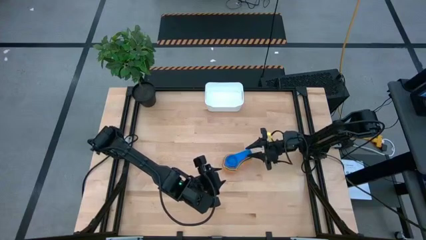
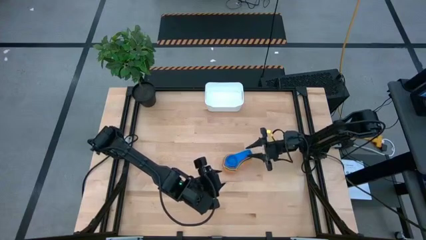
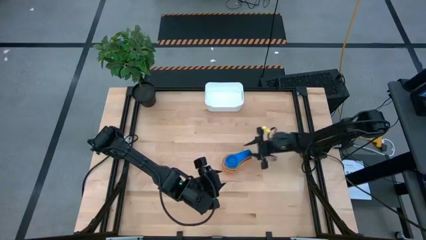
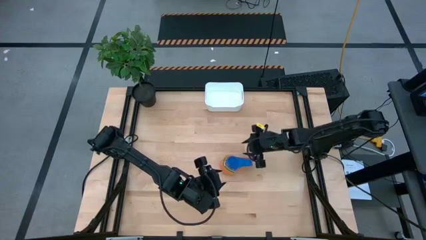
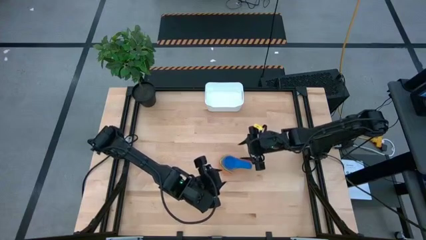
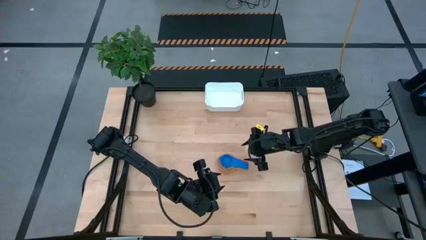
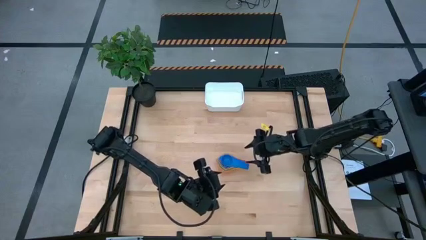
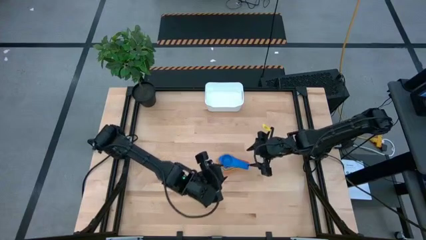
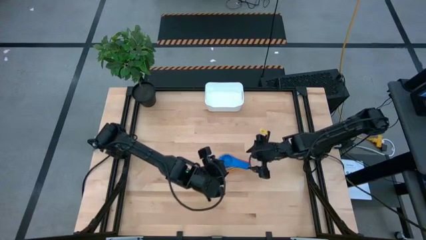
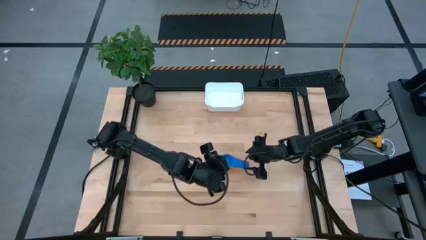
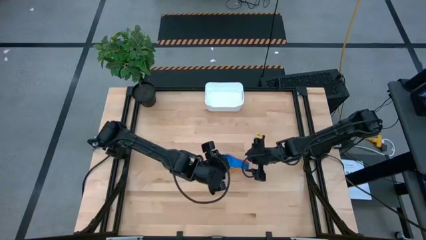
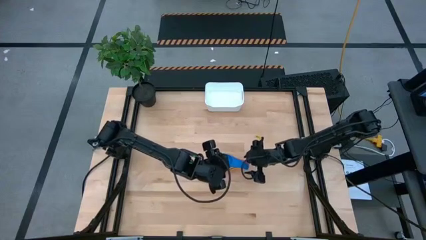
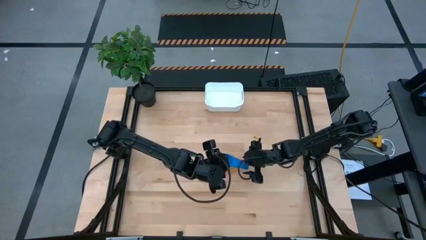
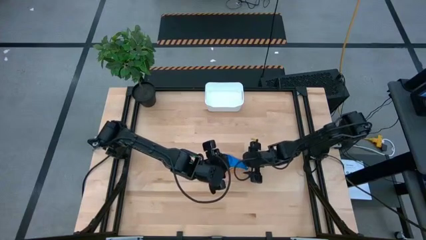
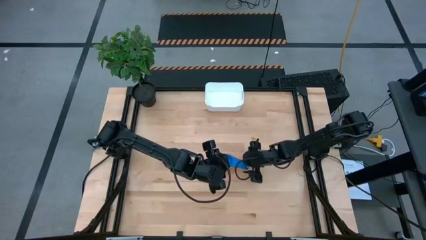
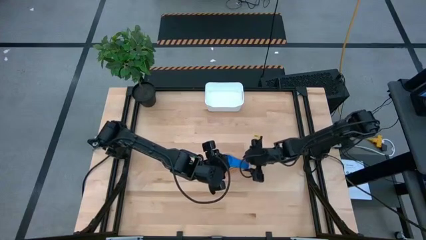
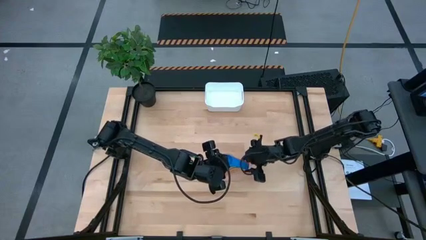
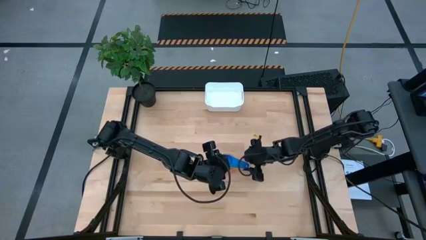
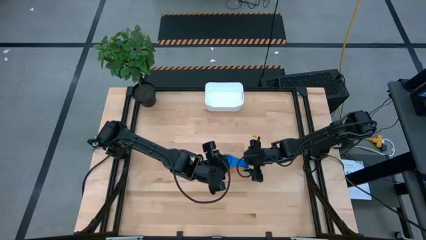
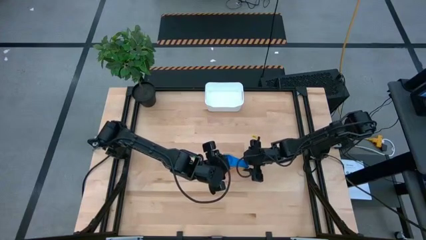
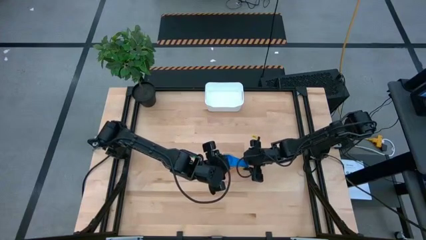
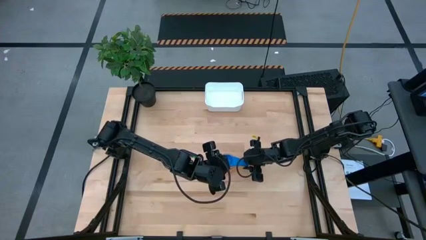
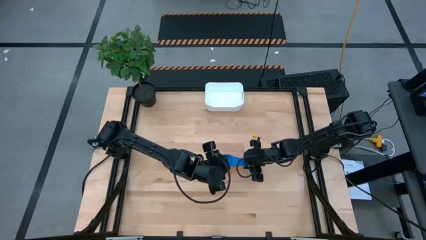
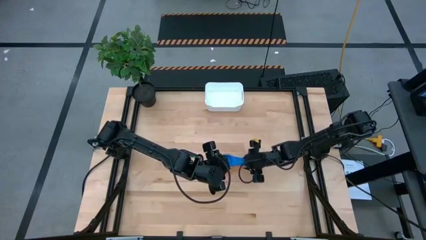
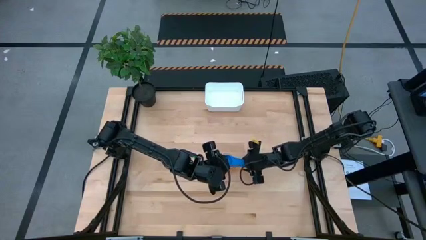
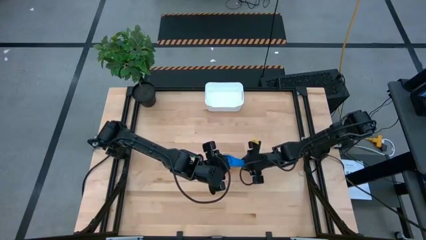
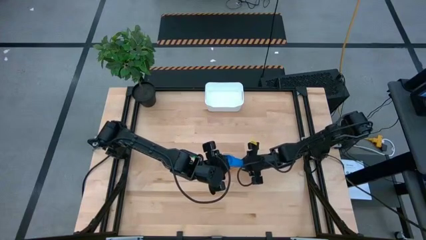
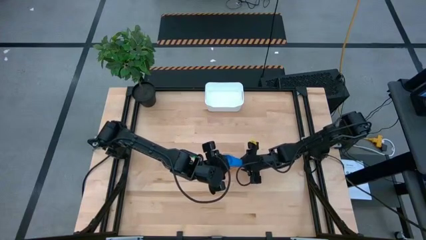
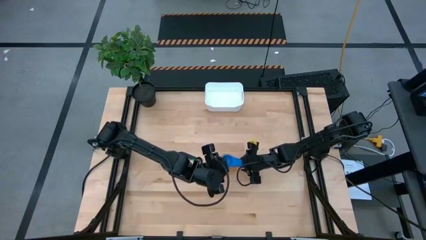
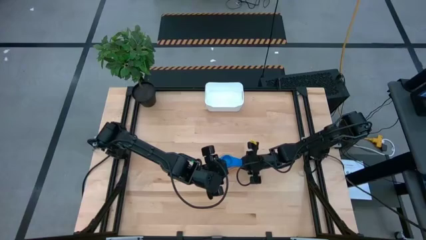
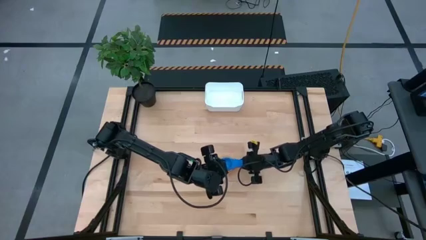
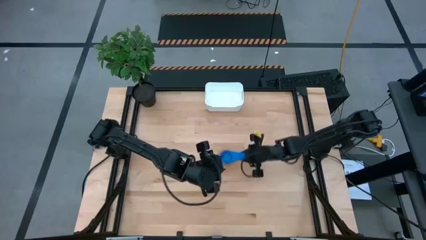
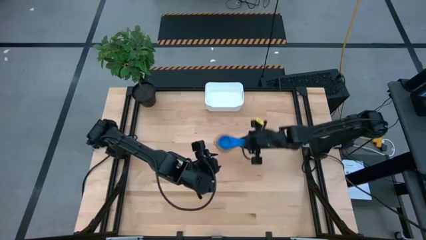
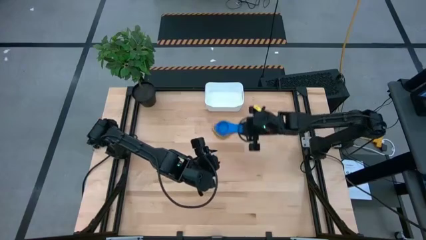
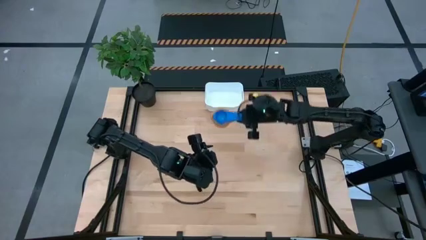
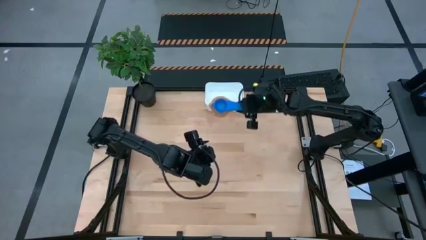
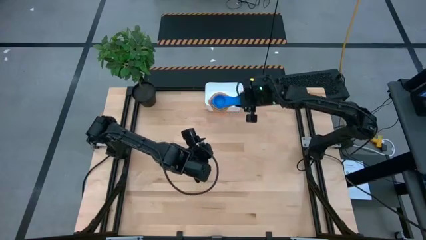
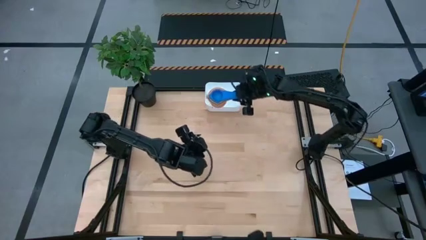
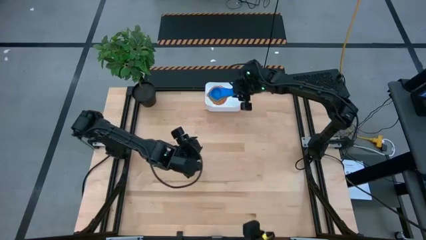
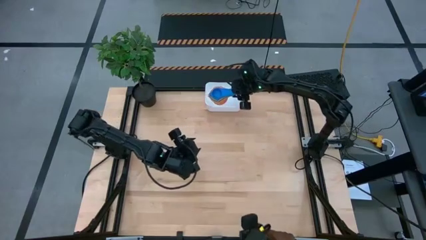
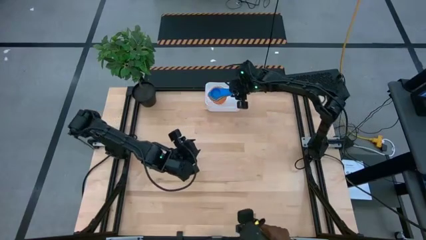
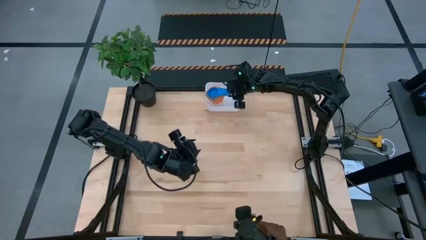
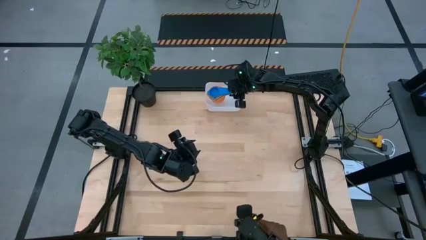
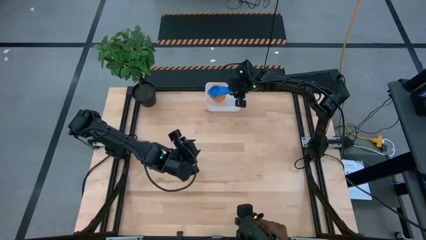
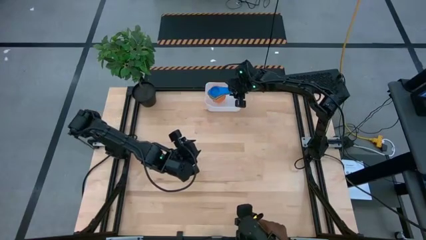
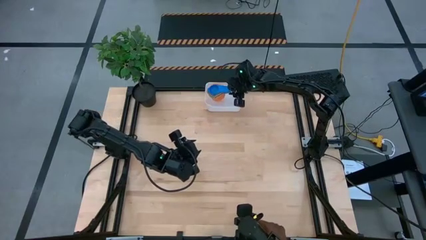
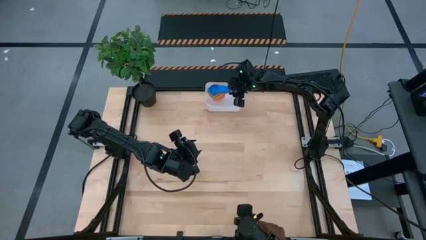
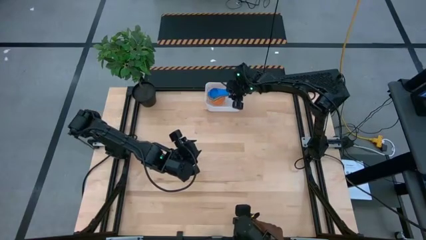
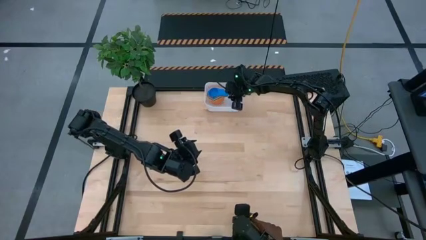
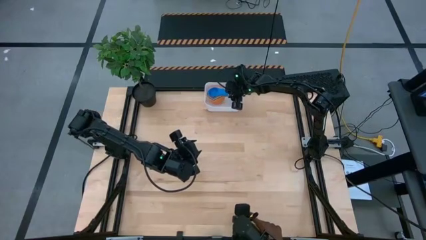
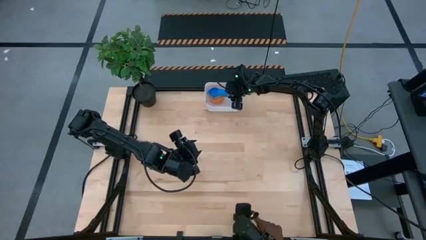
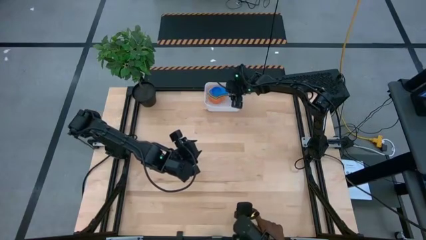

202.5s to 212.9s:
Task: Nest measuring cups in basket
Put the stacked measuring cups into the white bin

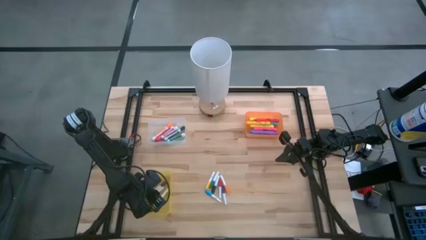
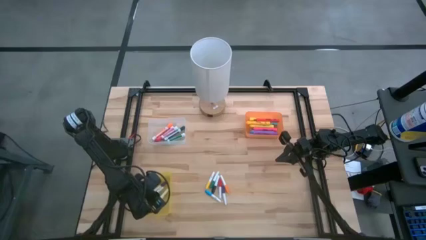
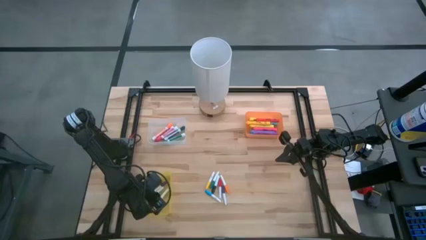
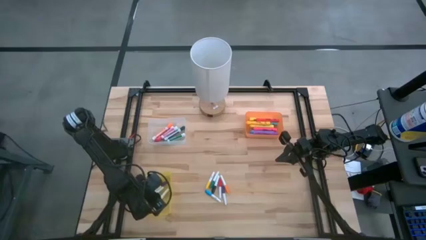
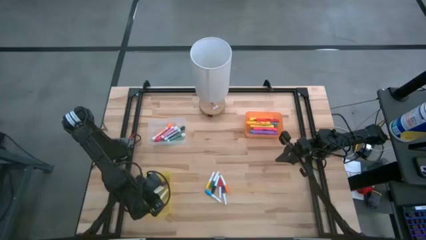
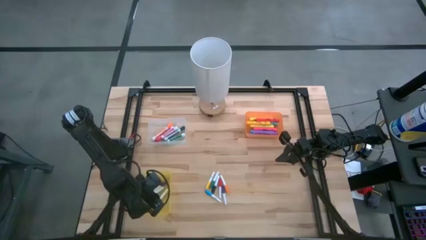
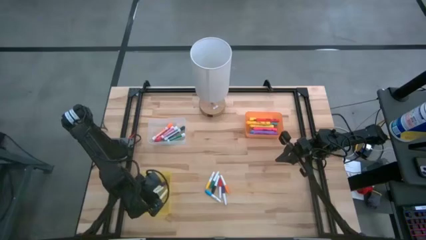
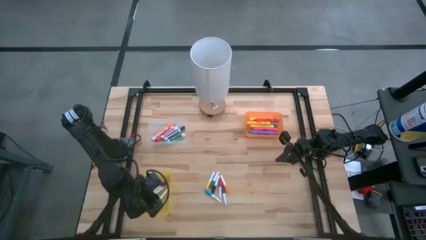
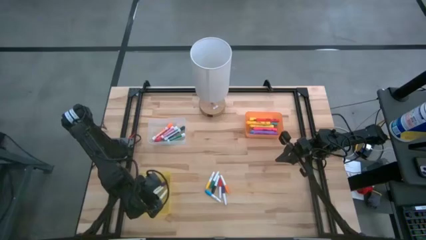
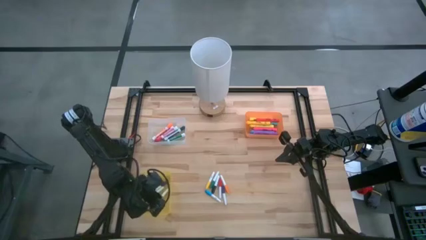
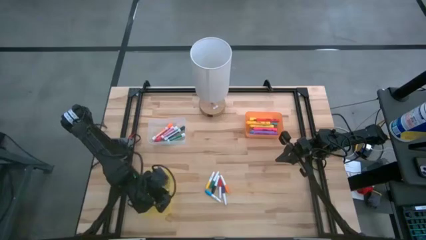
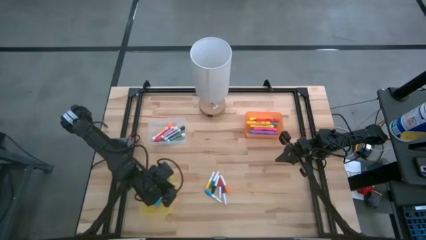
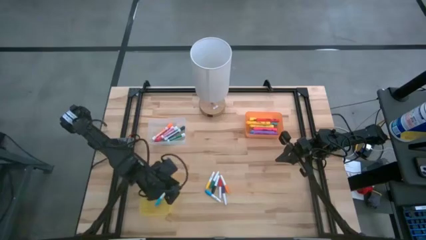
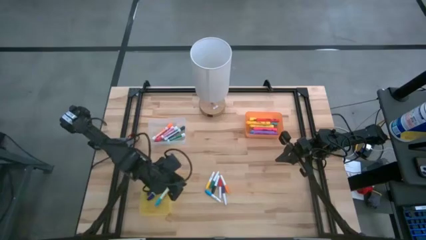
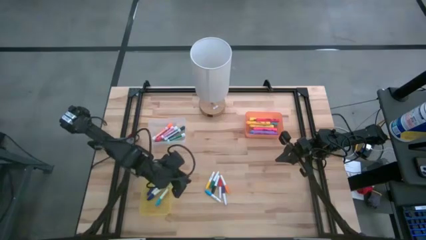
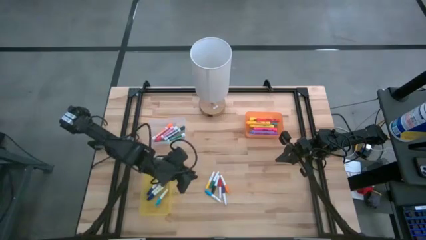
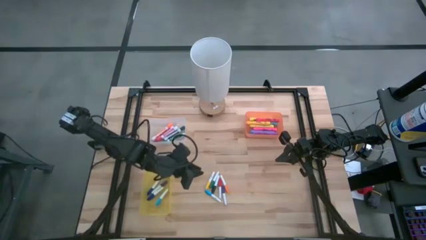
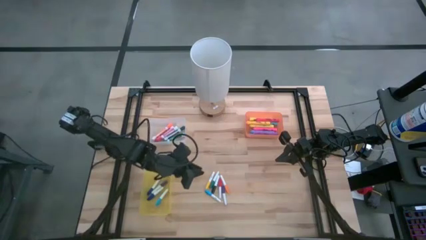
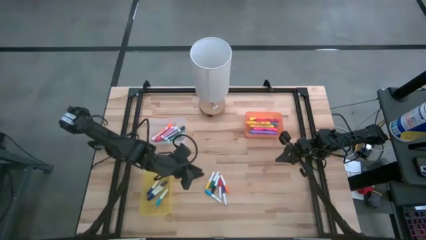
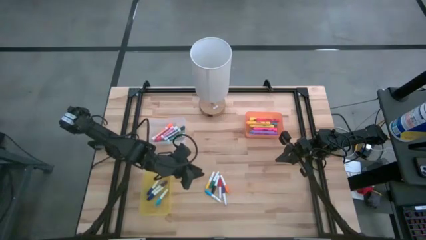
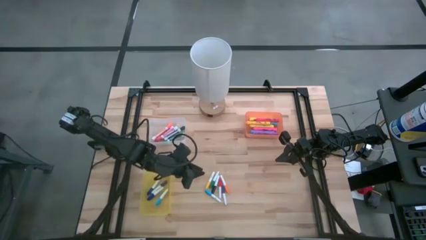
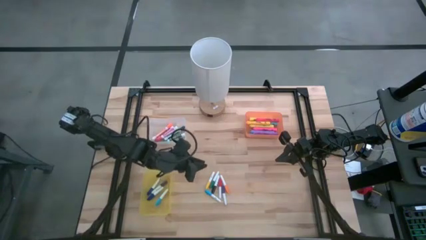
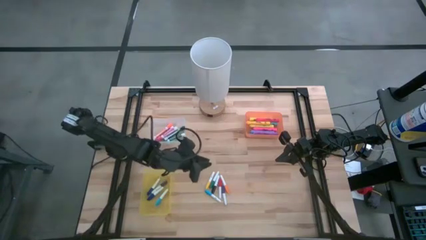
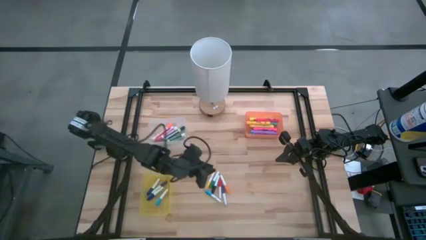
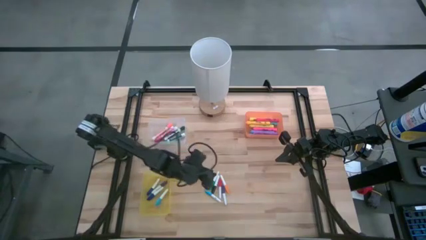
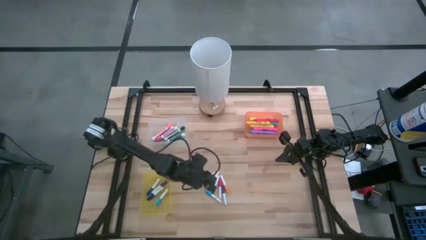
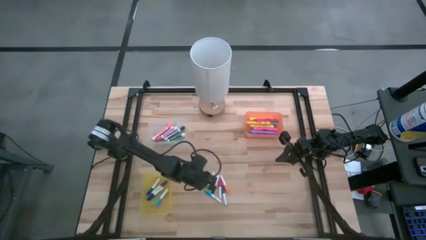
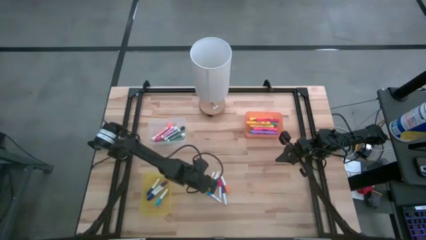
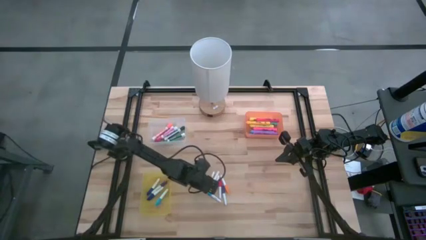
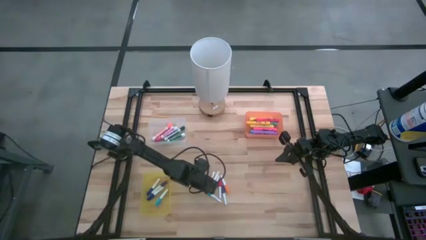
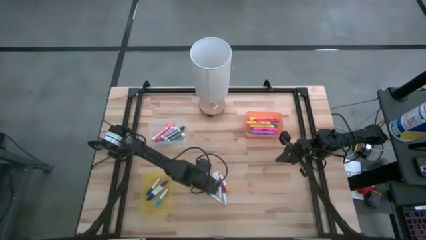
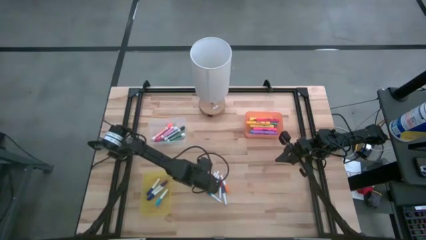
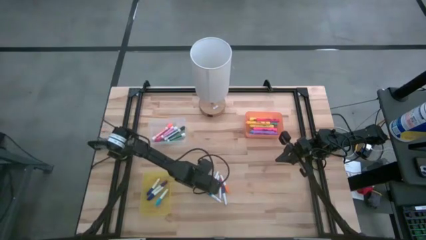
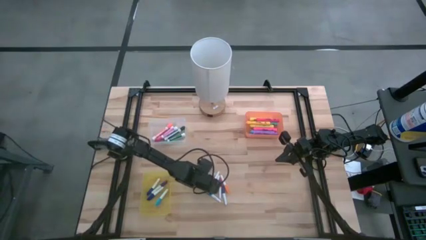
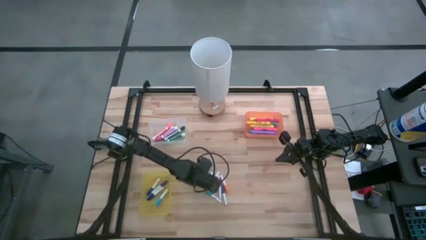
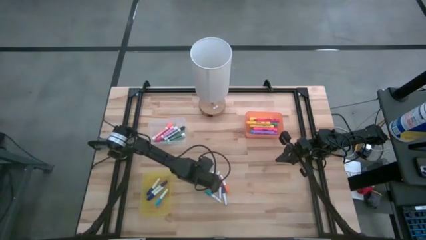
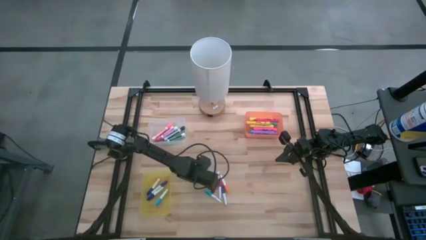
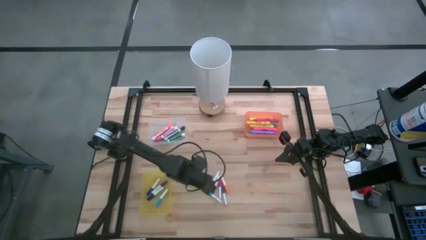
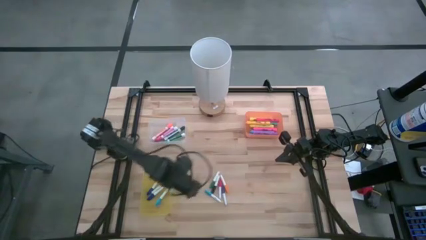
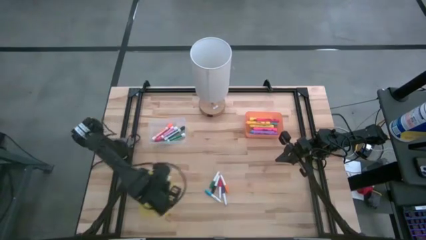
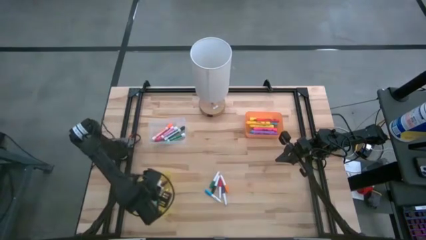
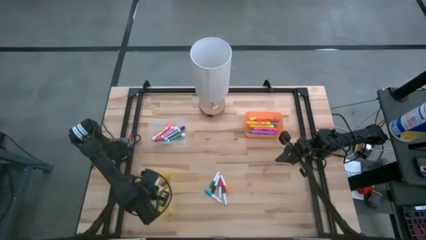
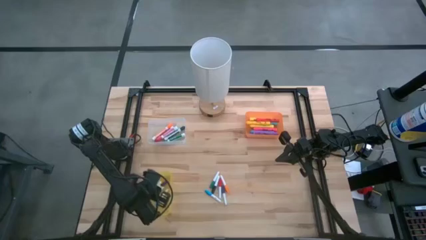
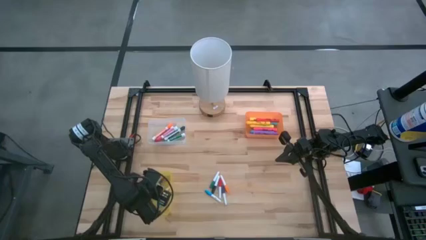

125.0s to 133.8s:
Task: Pick & Place Markers
Put the small yellow highlighter pen into the yellow bin
